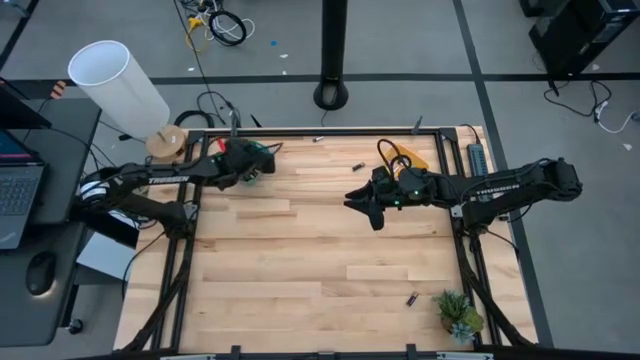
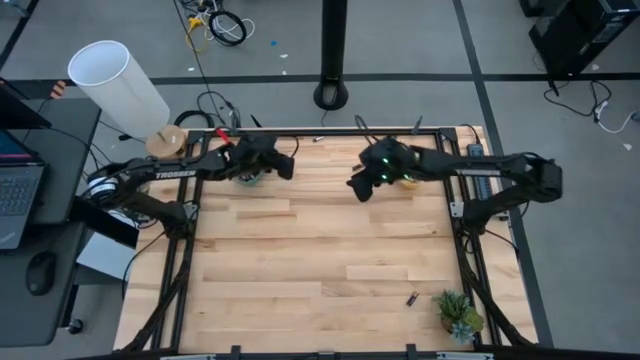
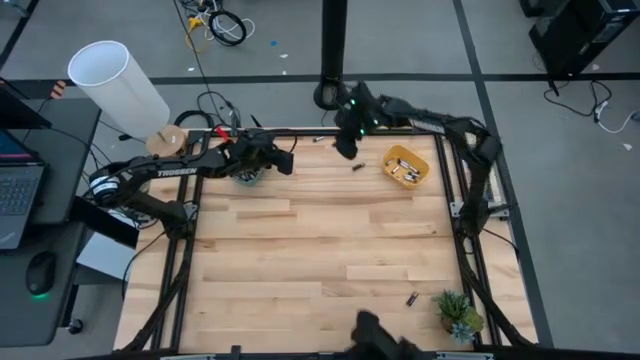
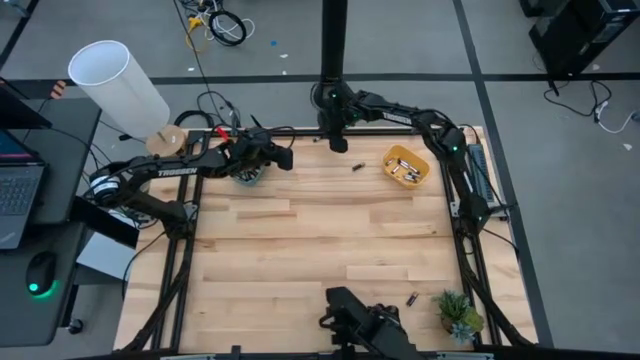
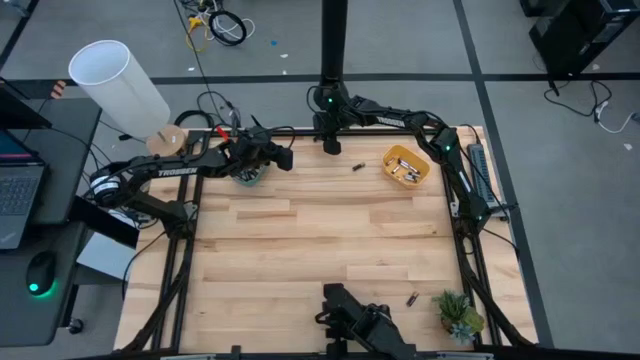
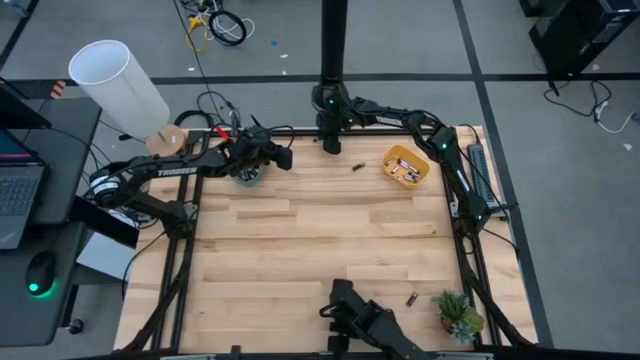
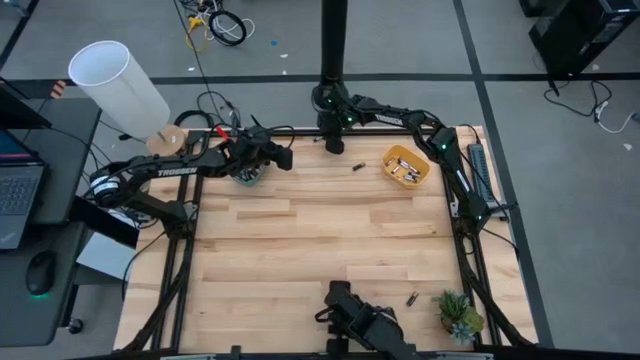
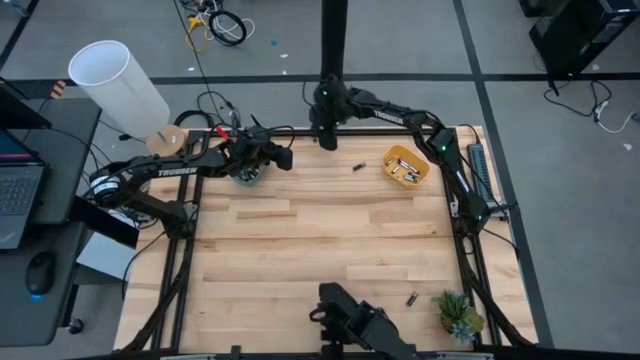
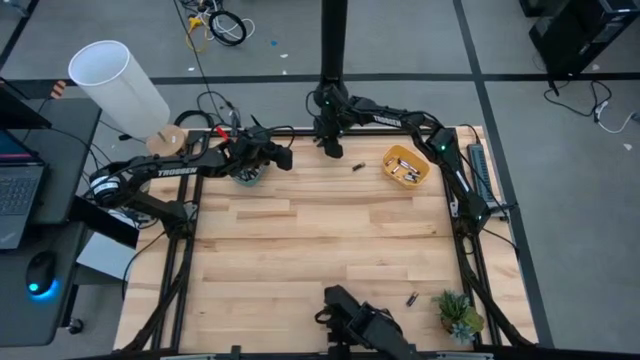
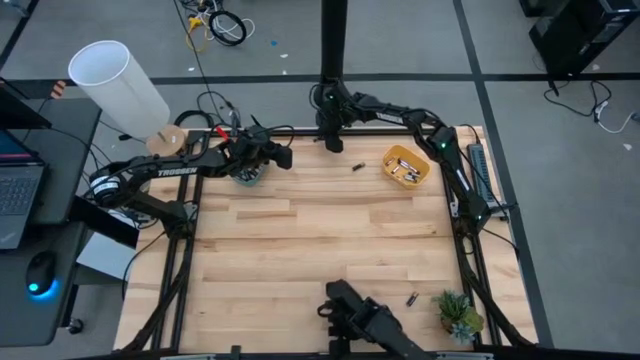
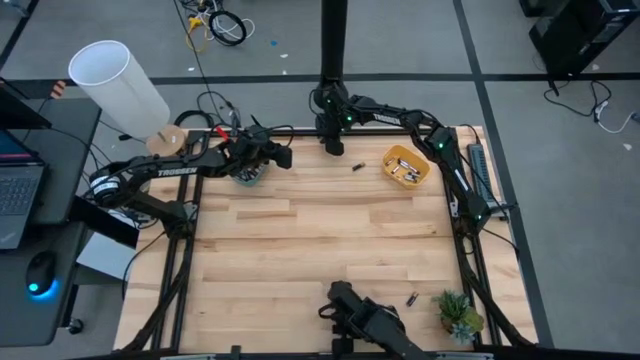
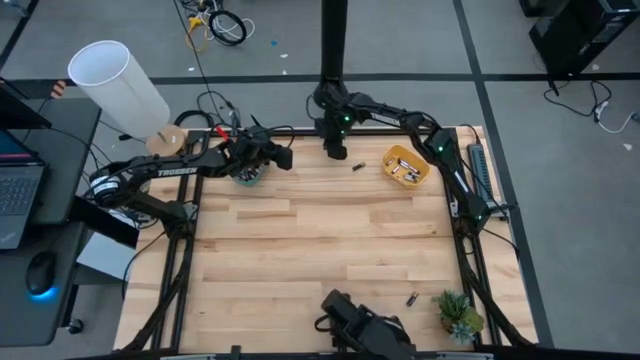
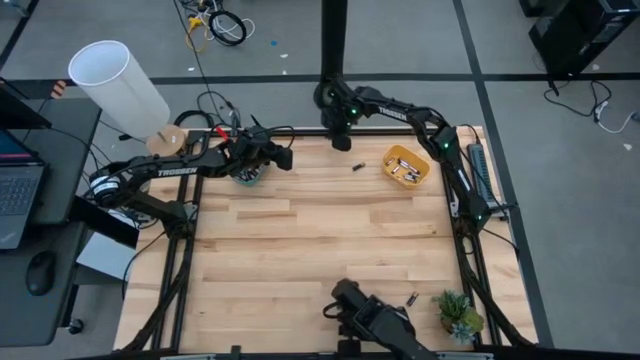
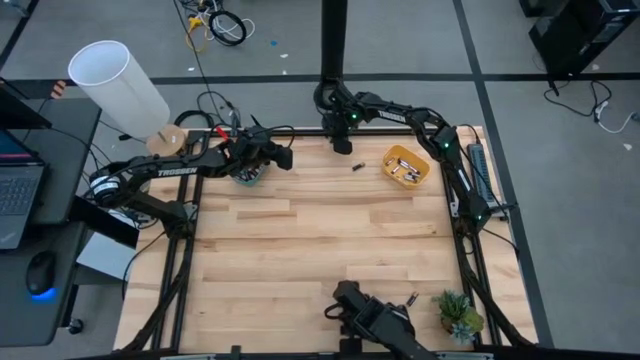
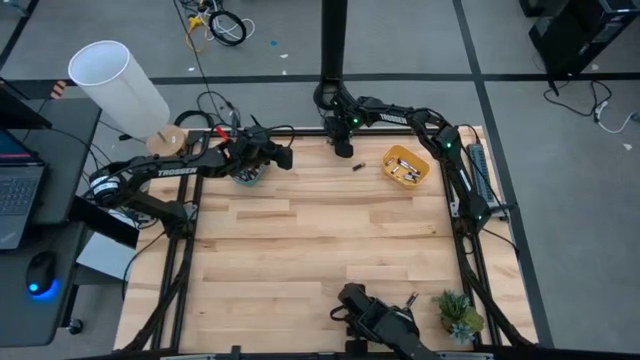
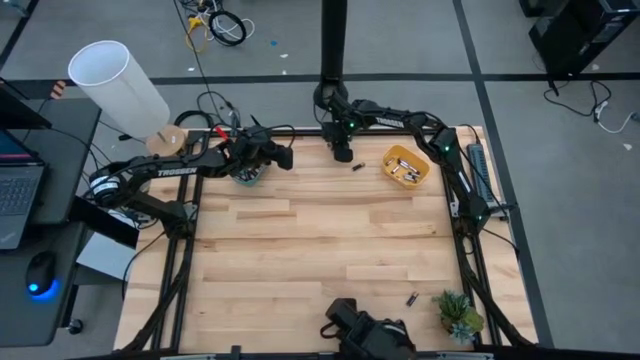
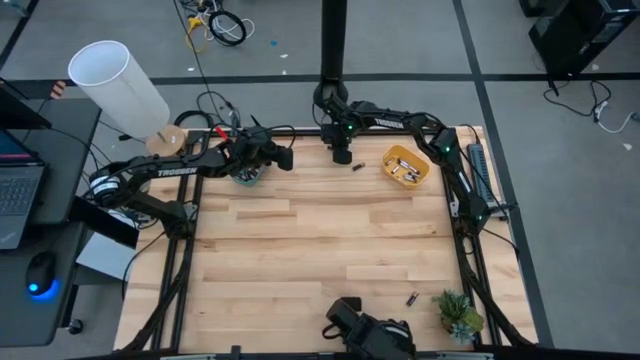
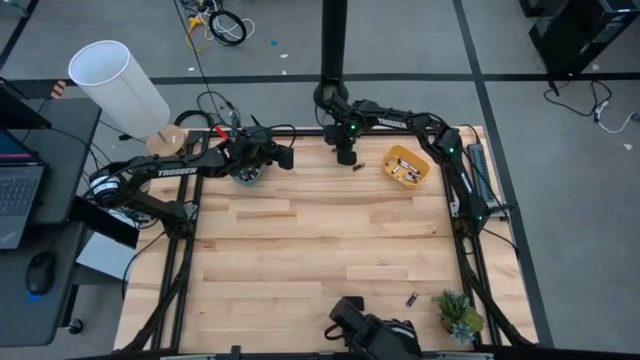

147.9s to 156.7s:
Task: Sort batteries
Put the silver battery into the yellow bin

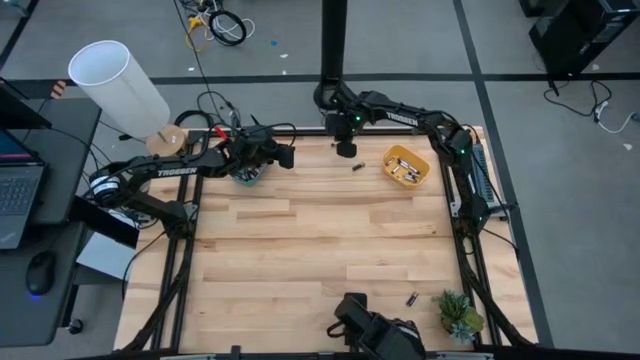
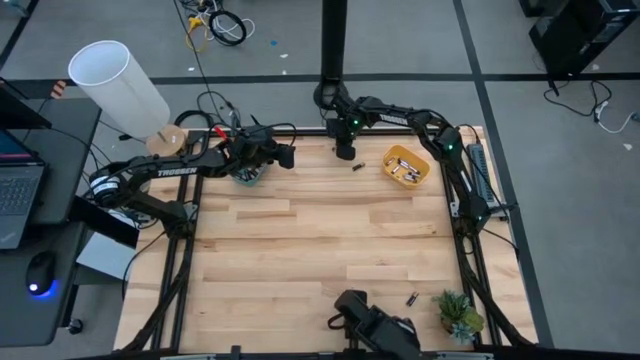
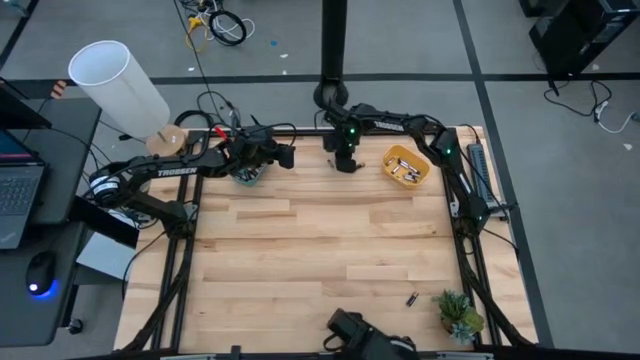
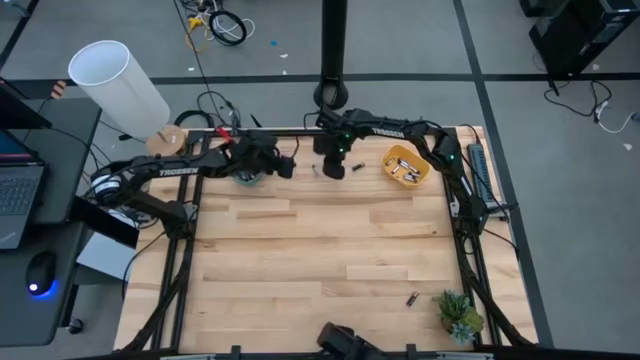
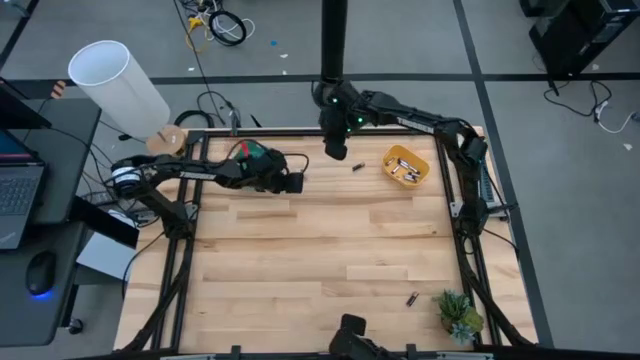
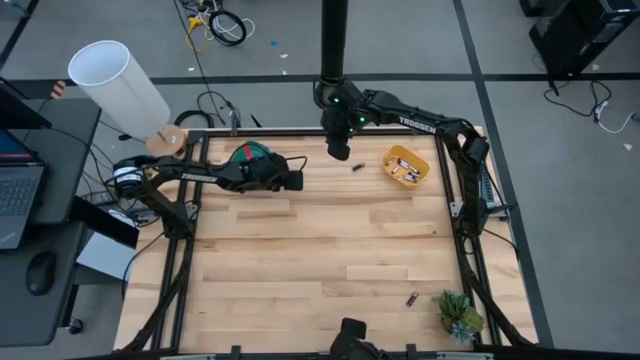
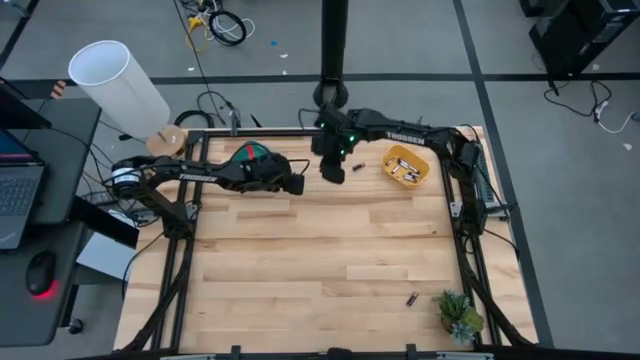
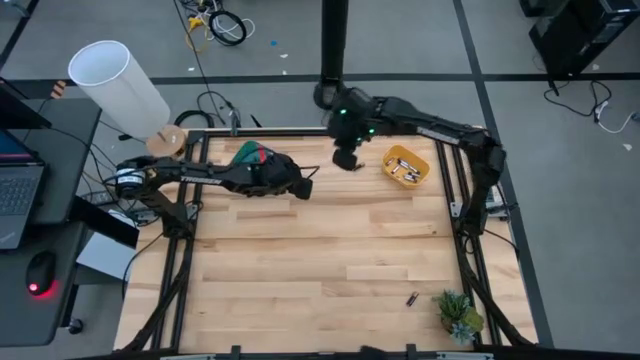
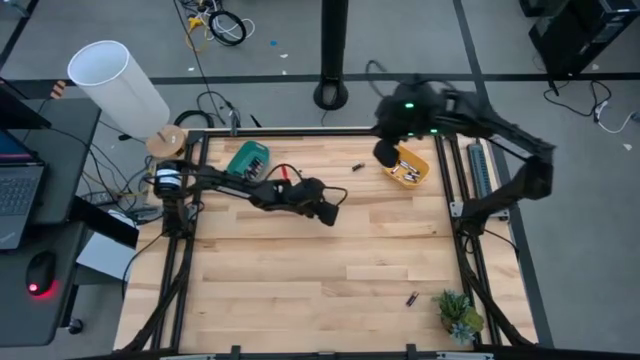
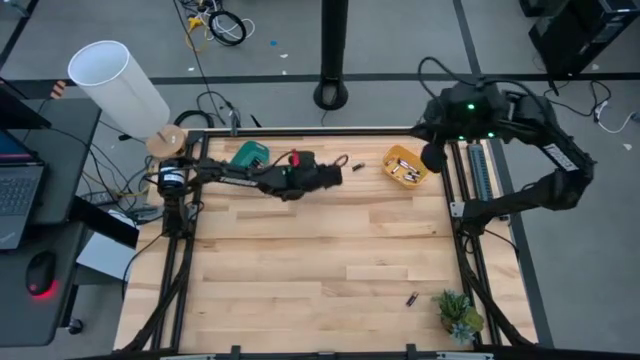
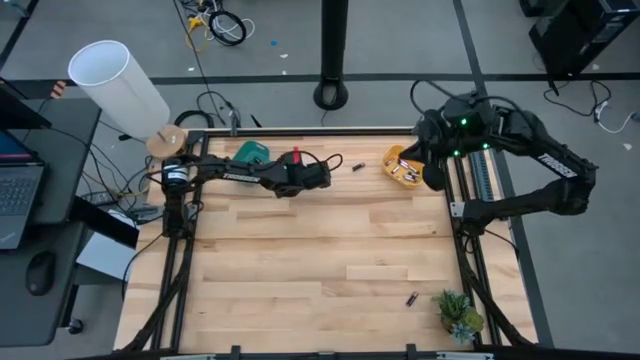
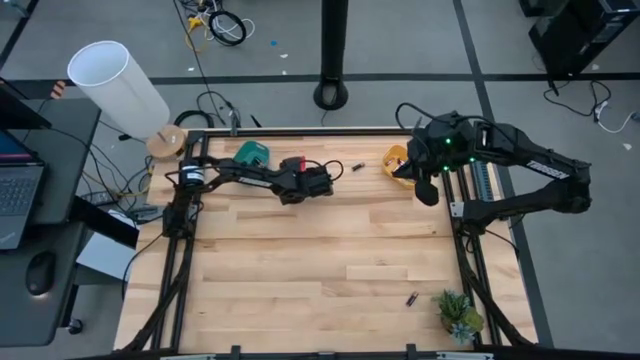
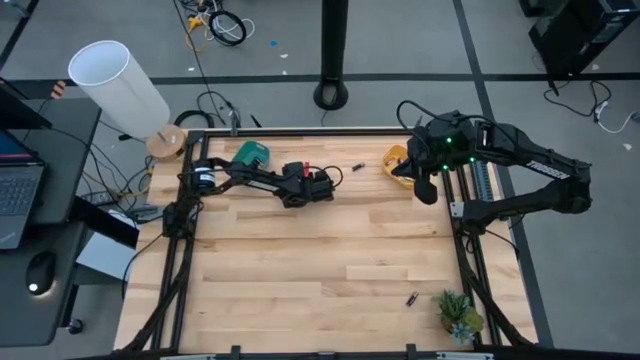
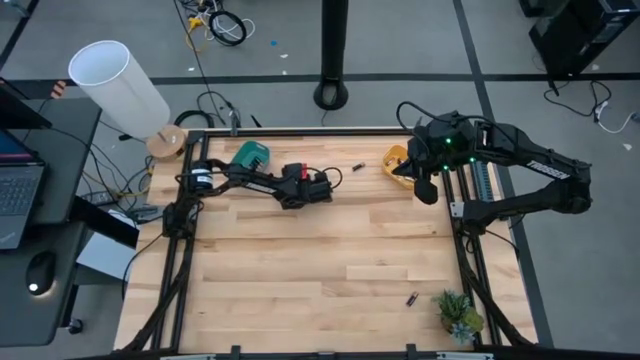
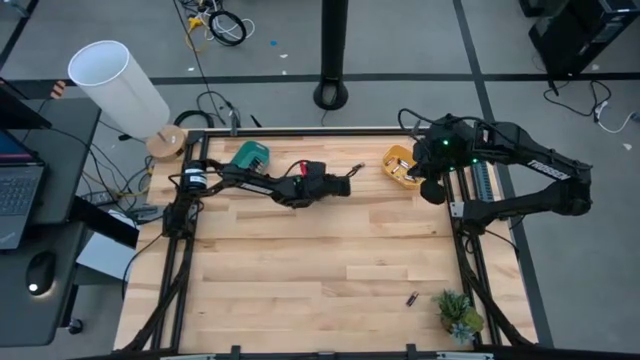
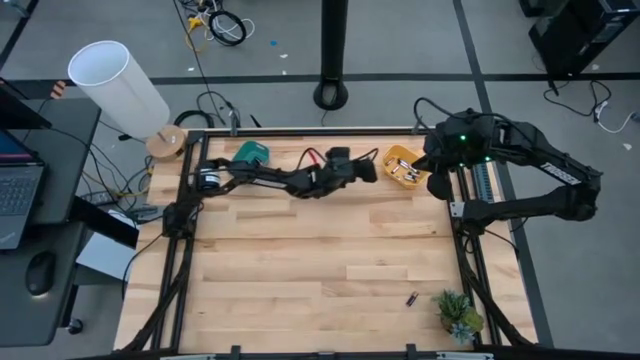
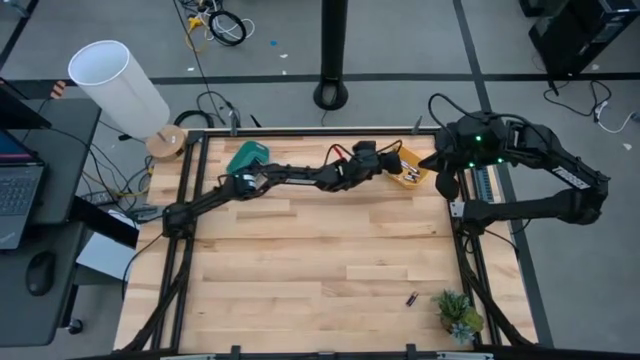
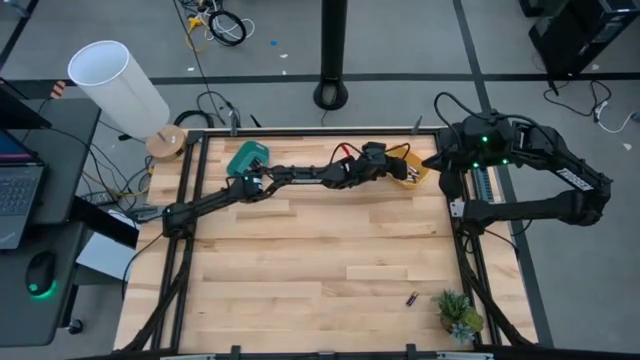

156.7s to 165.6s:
Put the silver battery into the yellow bin
